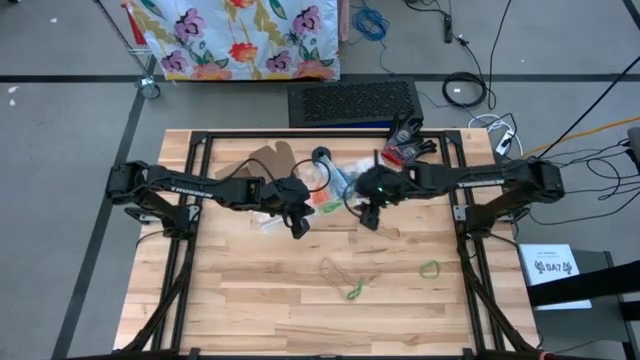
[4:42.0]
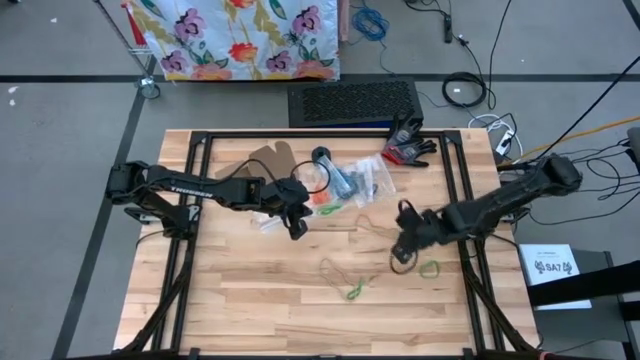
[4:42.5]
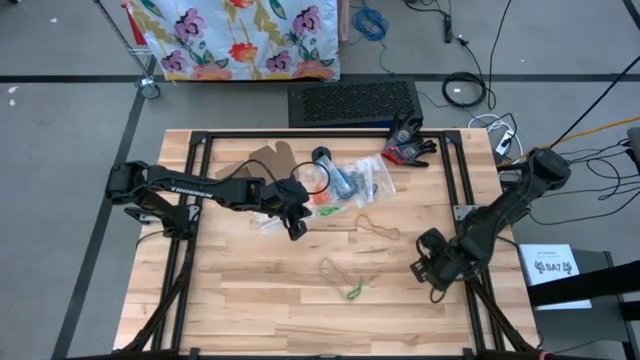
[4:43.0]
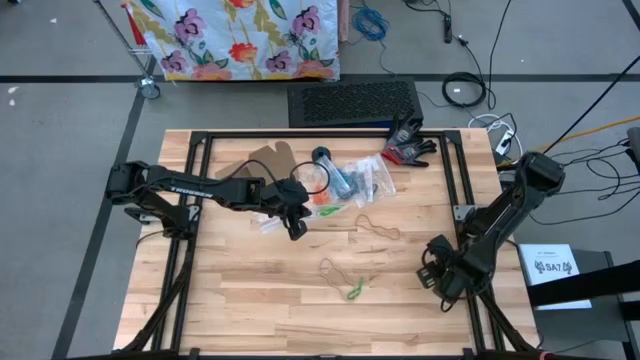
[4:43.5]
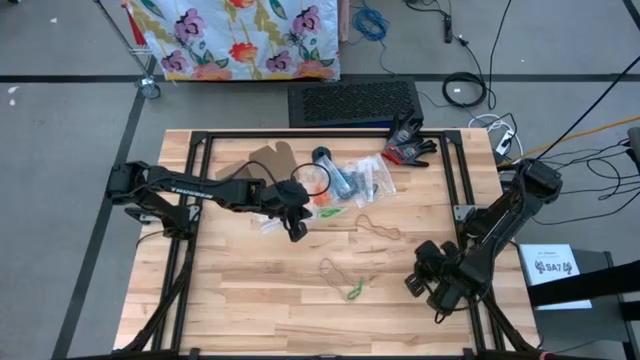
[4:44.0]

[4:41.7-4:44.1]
Task: Sort rubber bands
Put the green rubber band into the transparent zip bag

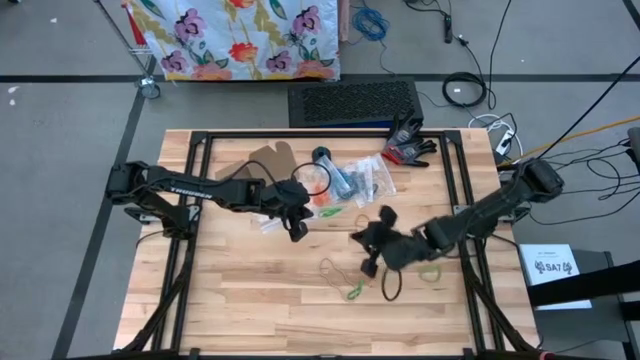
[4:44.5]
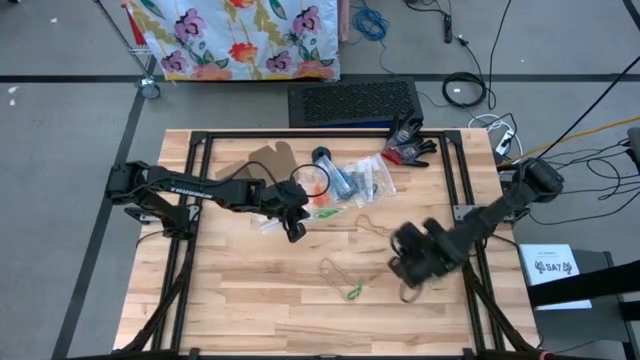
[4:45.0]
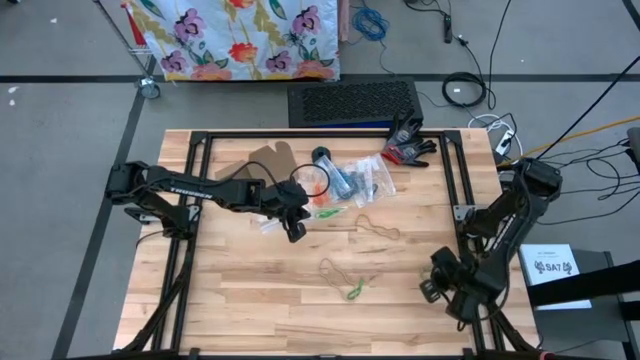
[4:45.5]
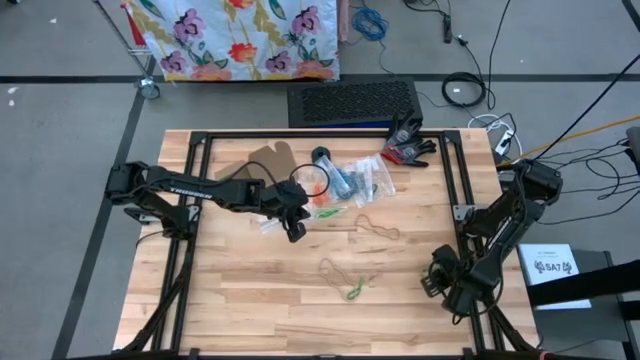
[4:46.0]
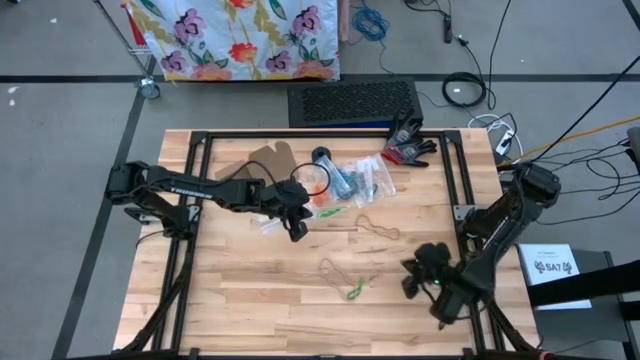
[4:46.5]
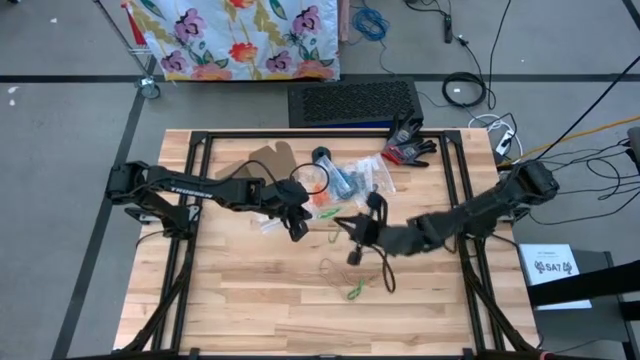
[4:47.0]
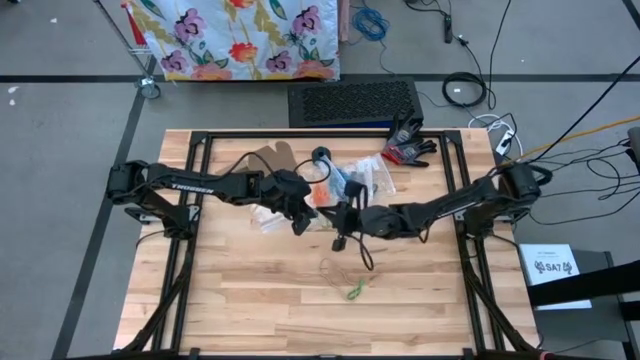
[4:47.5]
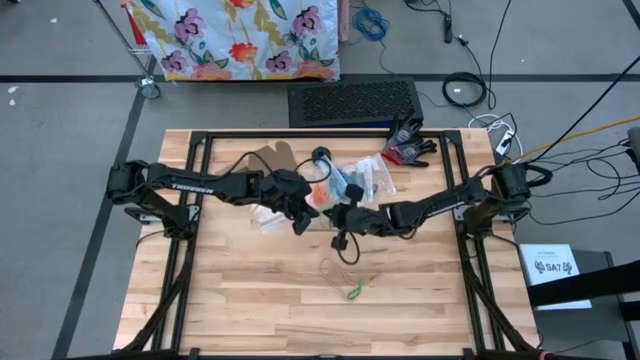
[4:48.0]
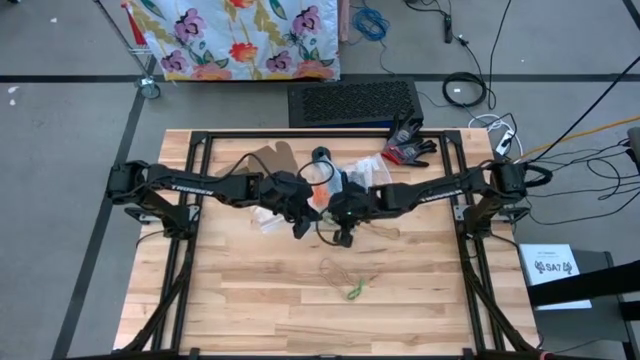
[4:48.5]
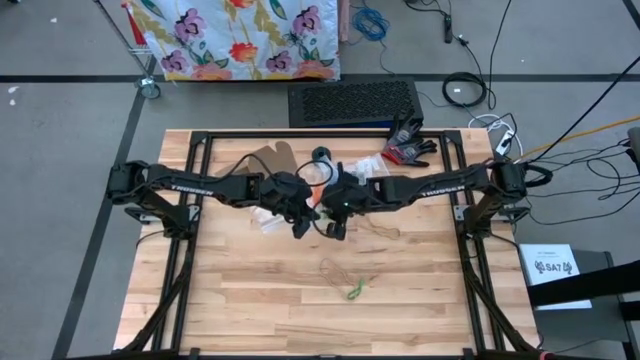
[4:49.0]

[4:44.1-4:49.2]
Put the green rubber band into the transparent zip bag

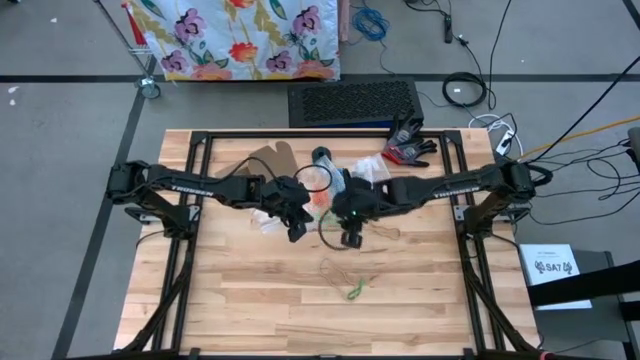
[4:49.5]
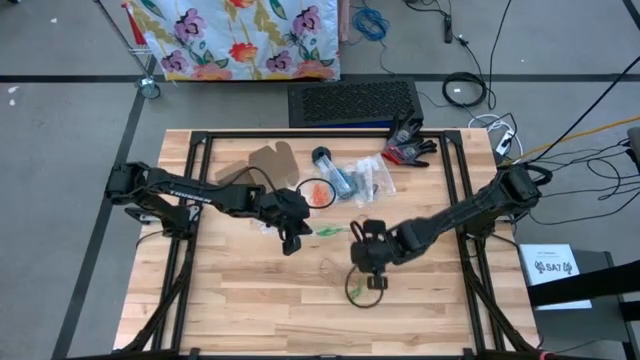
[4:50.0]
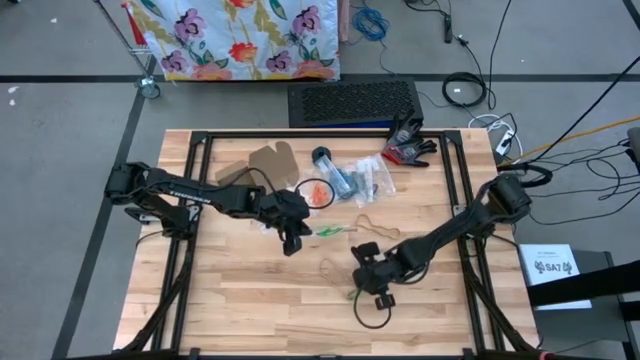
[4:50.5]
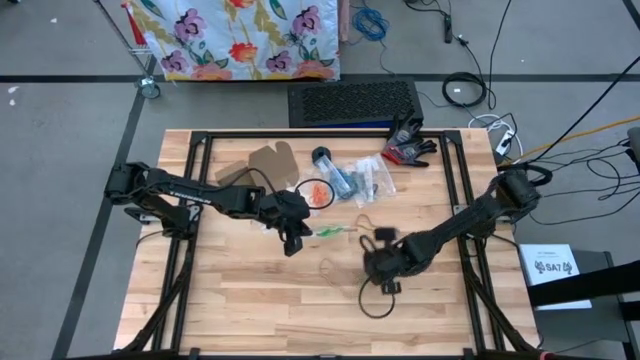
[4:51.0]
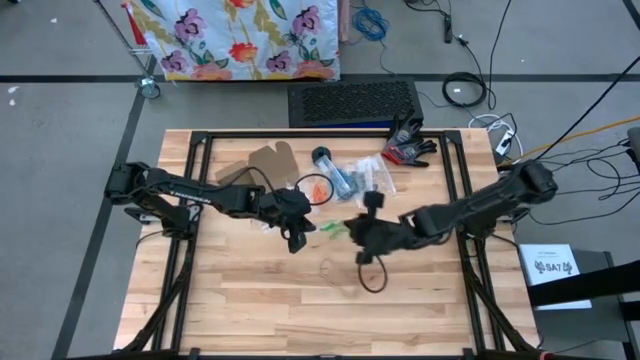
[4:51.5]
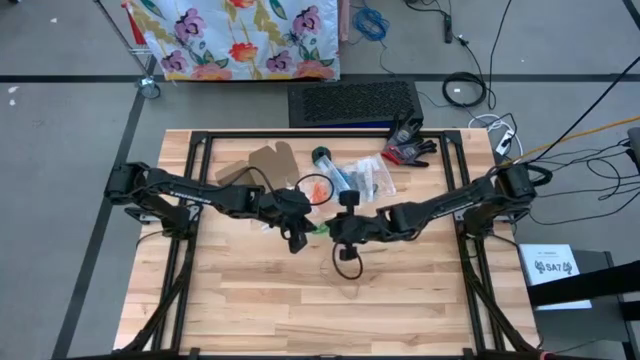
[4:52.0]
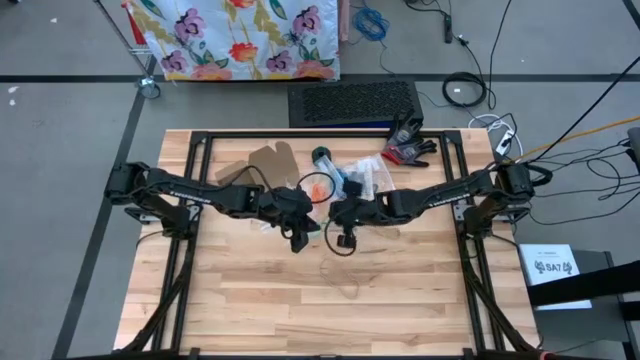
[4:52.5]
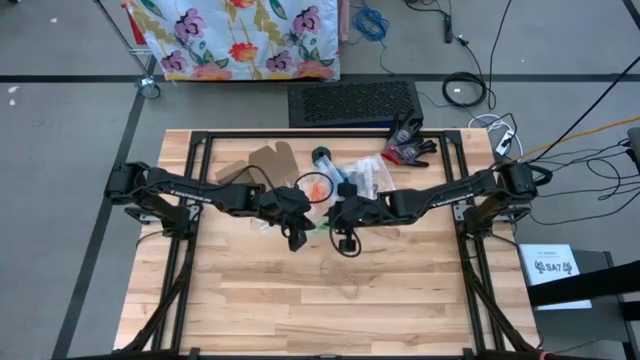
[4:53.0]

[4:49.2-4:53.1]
Put the green rubber band into the transparent zip bag

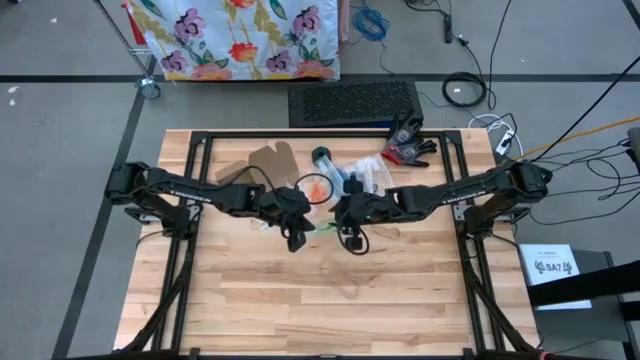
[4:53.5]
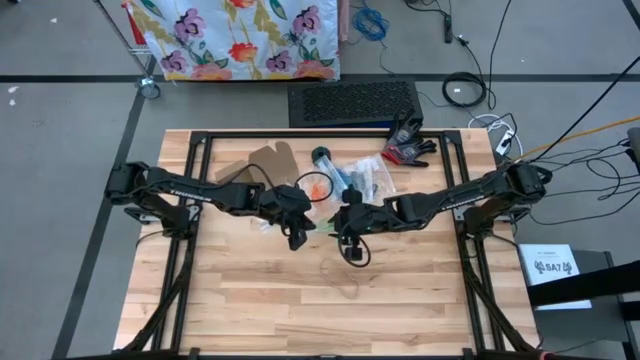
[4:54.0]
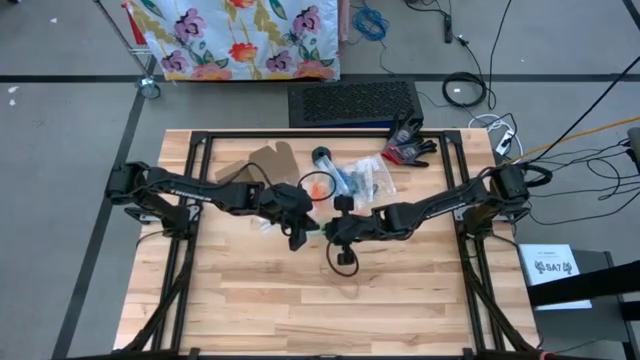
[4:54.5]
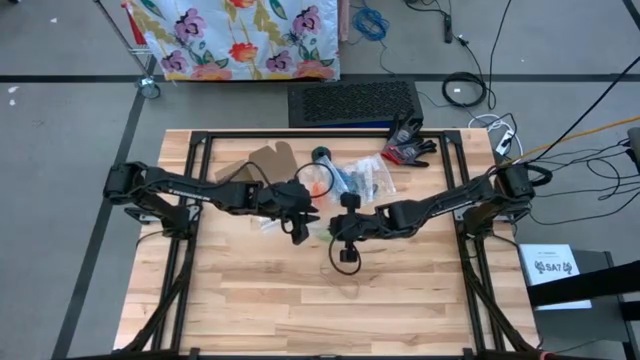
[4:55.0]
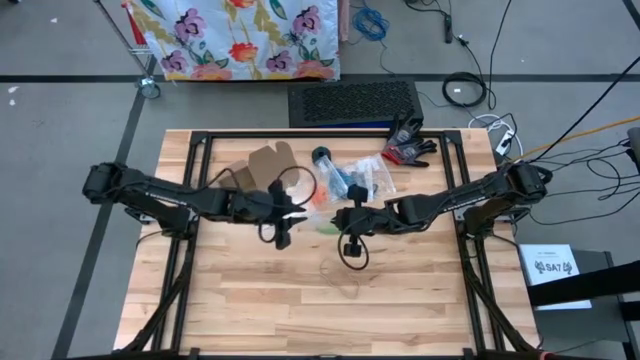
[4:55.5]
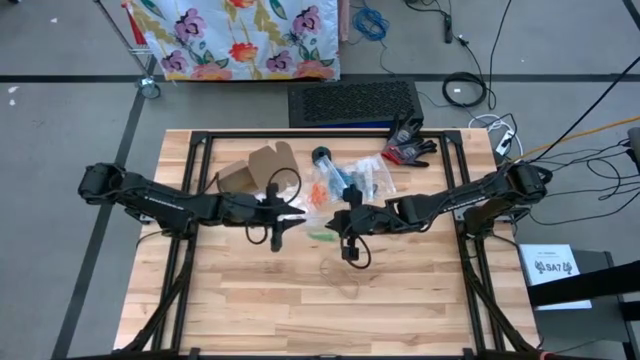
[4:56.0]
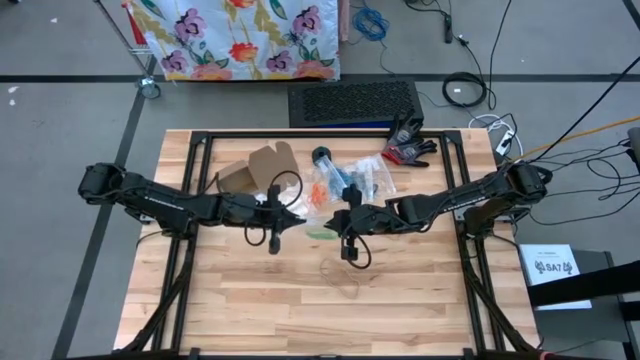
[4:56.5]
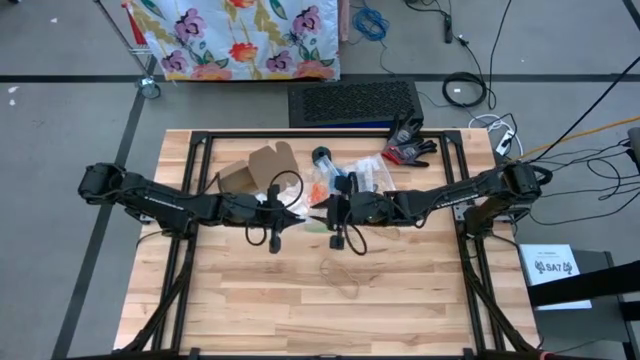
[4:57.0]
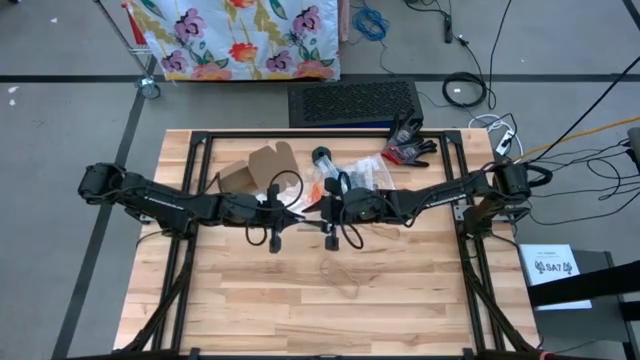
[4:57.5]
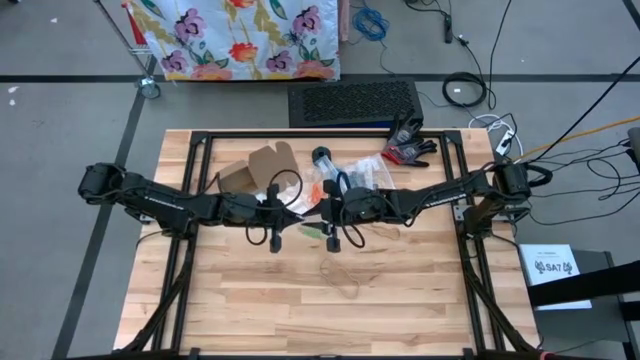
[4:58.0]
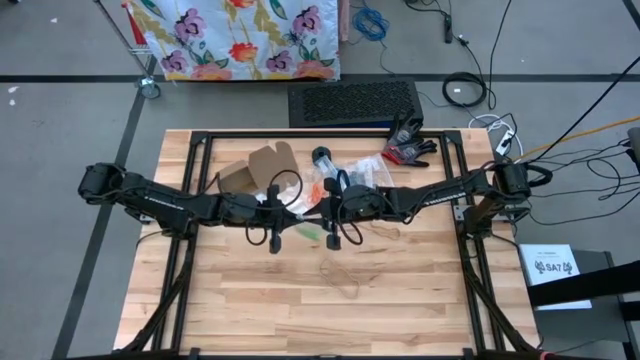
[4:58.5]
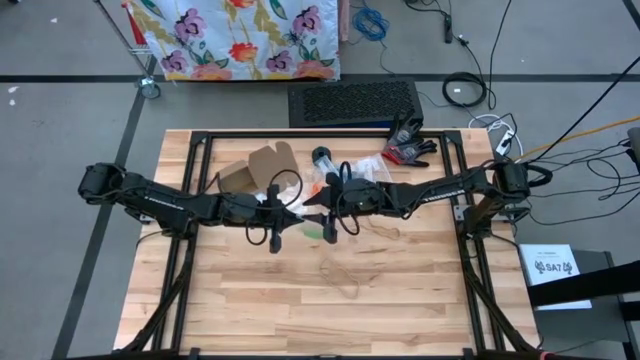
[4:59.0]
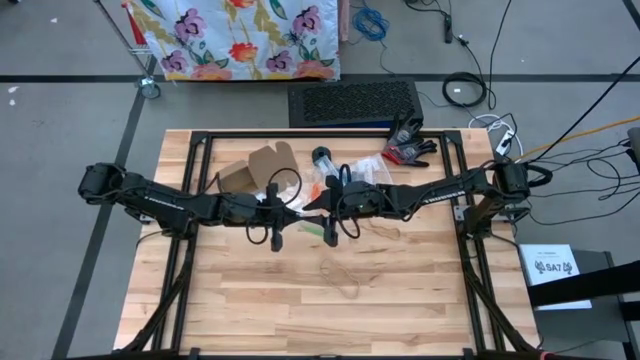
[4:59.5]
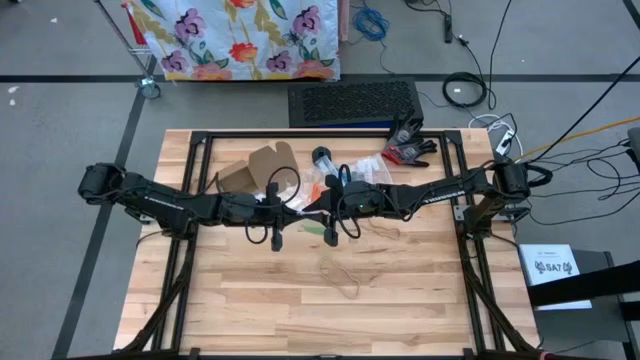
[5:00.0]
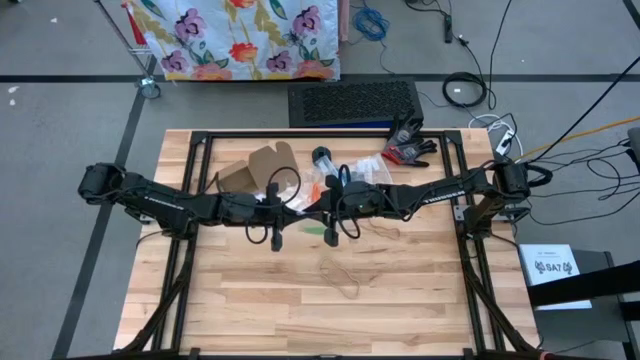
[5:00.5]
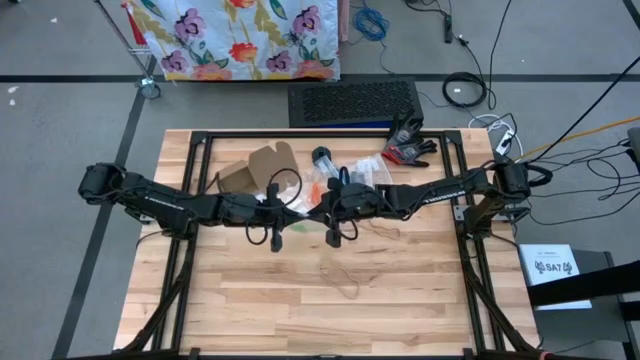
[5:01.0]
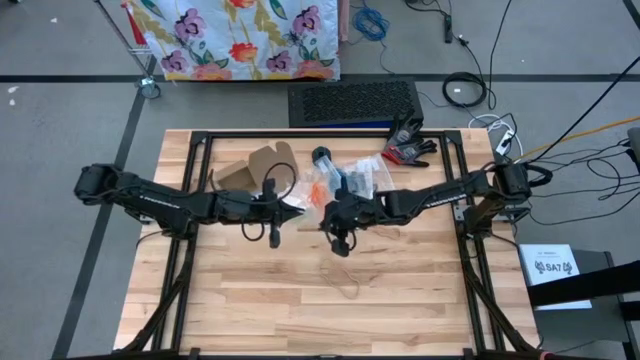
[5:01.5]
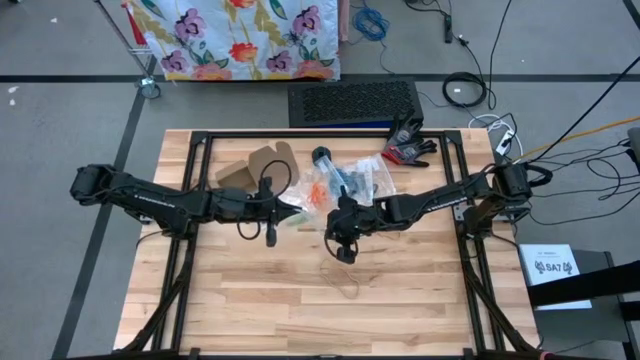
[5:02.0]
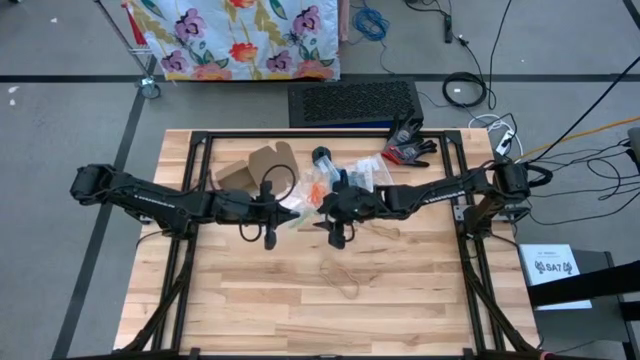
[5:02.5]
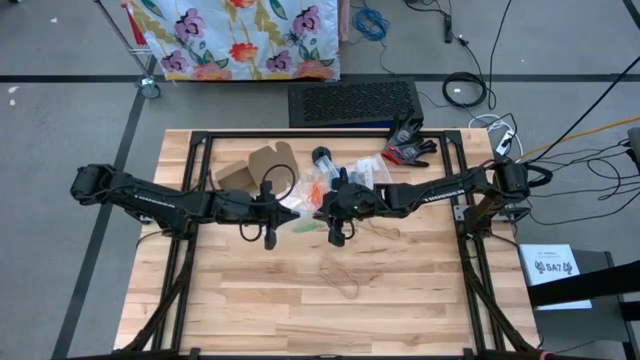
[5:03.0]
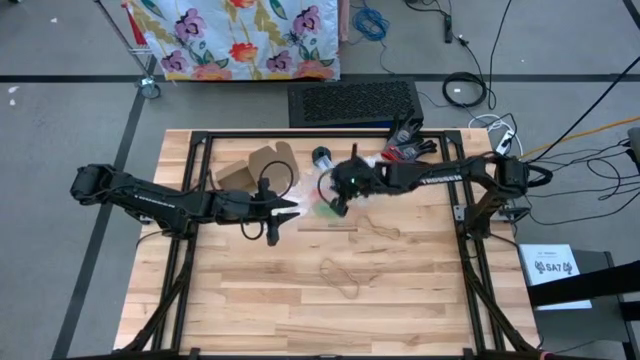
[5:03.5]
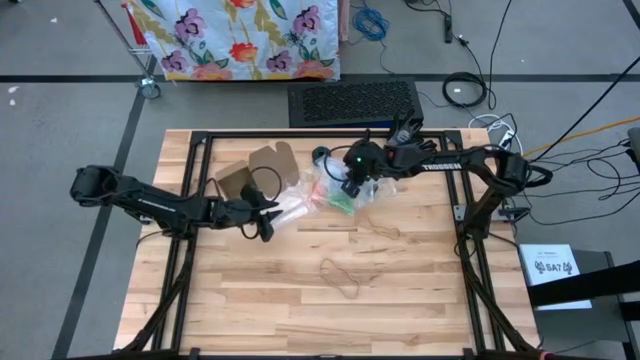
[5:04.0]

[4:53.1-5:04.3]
Close the transparent zip bag
